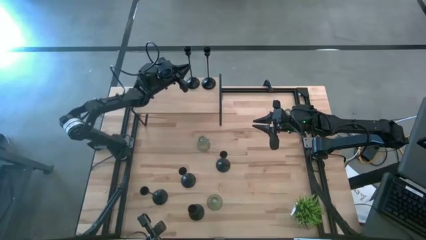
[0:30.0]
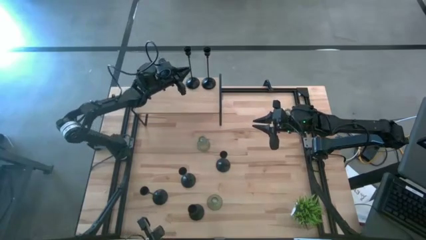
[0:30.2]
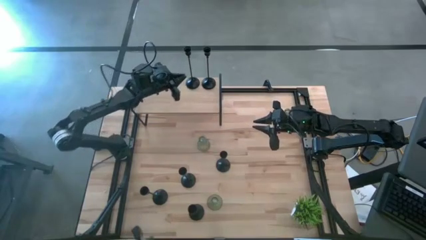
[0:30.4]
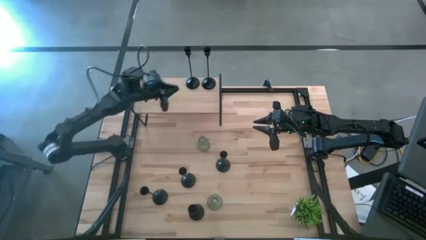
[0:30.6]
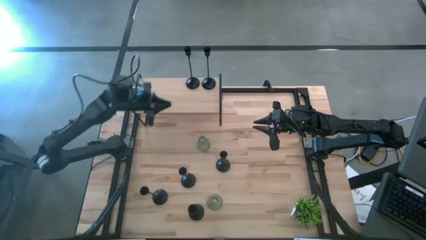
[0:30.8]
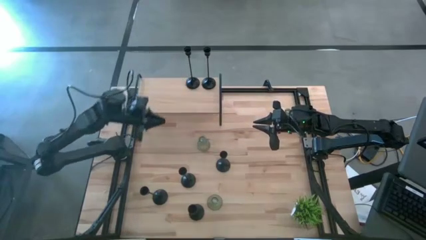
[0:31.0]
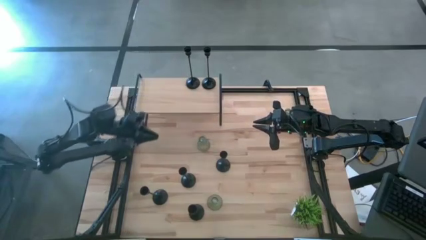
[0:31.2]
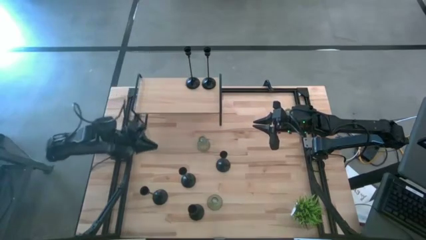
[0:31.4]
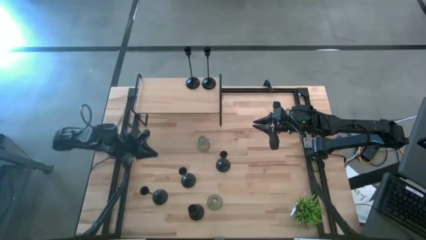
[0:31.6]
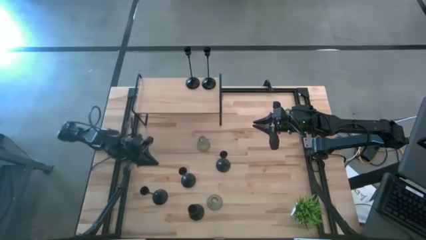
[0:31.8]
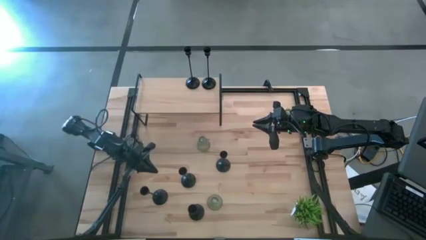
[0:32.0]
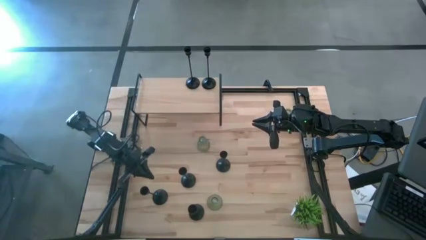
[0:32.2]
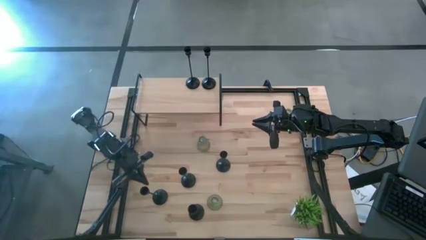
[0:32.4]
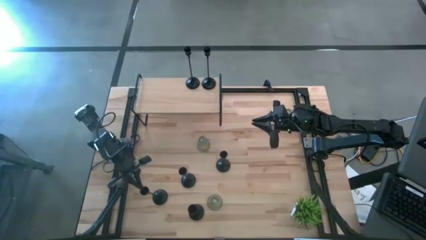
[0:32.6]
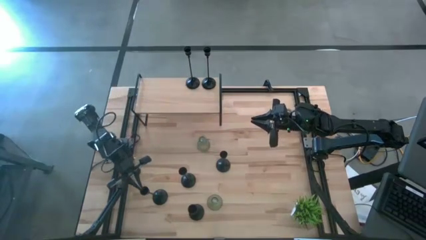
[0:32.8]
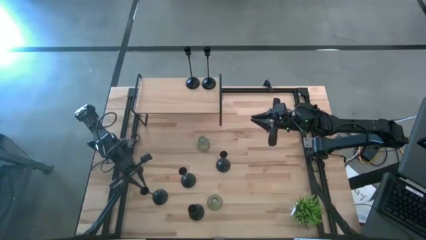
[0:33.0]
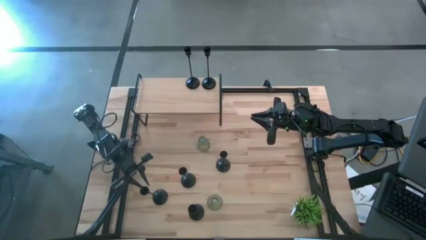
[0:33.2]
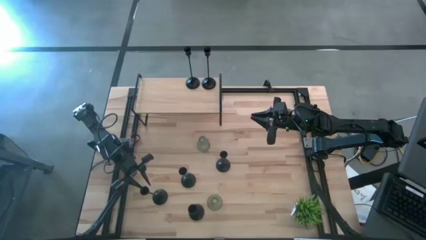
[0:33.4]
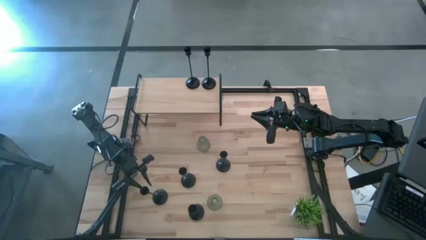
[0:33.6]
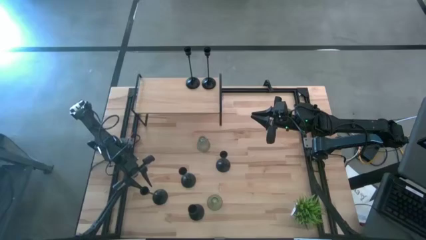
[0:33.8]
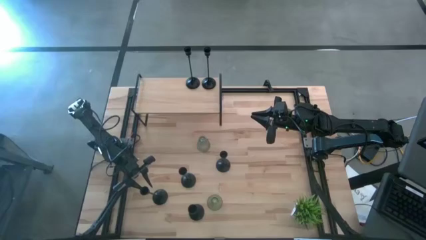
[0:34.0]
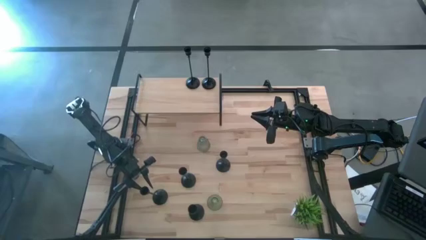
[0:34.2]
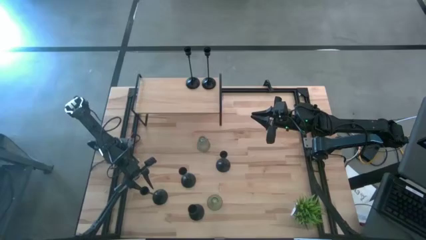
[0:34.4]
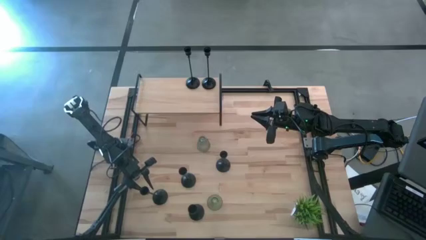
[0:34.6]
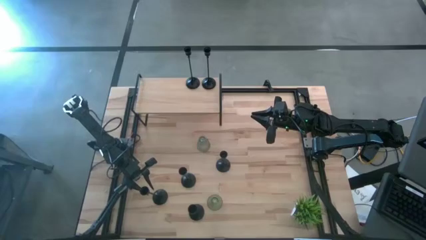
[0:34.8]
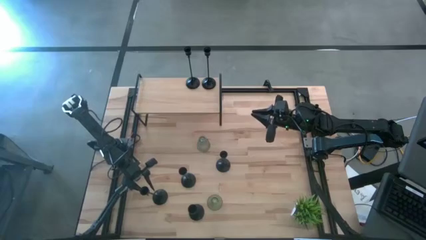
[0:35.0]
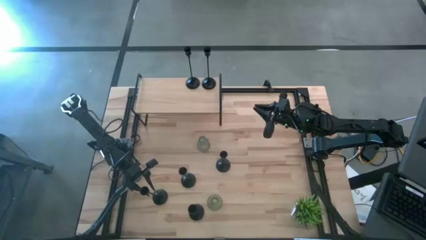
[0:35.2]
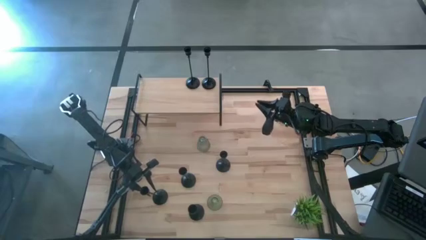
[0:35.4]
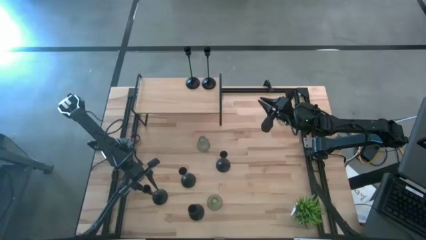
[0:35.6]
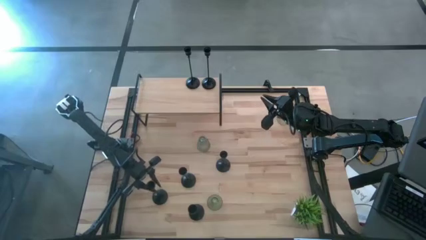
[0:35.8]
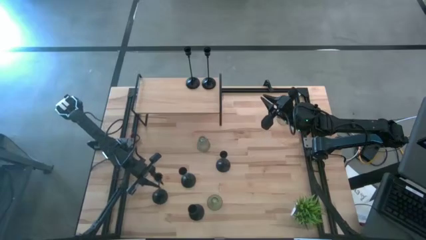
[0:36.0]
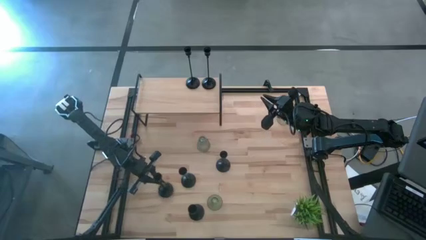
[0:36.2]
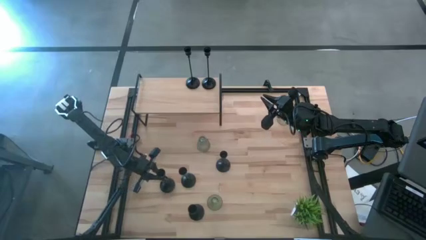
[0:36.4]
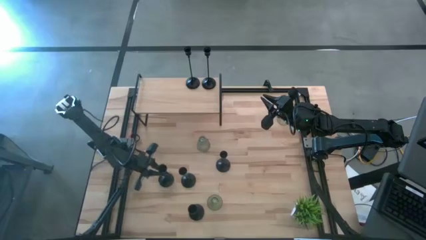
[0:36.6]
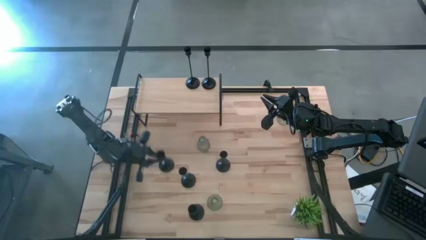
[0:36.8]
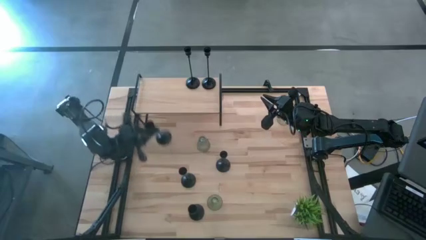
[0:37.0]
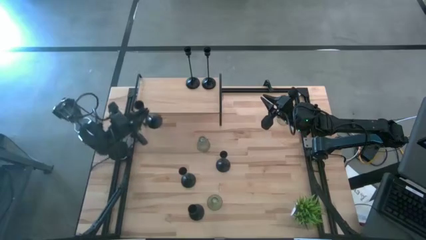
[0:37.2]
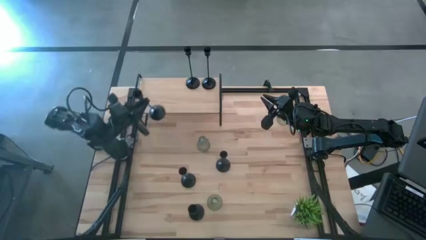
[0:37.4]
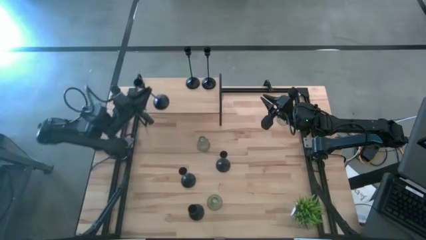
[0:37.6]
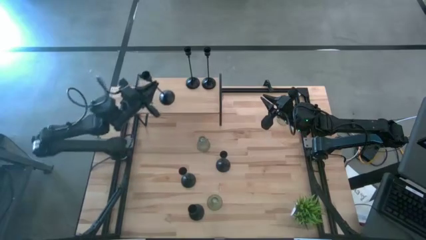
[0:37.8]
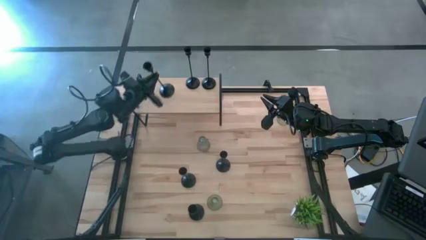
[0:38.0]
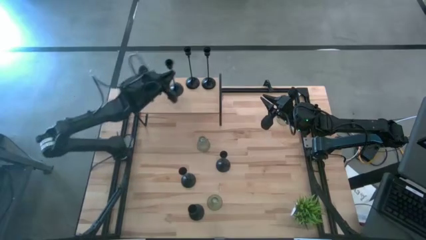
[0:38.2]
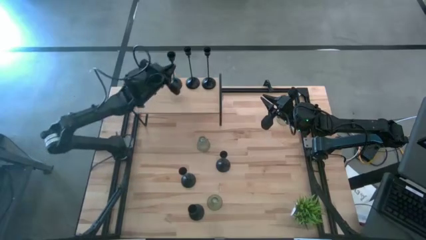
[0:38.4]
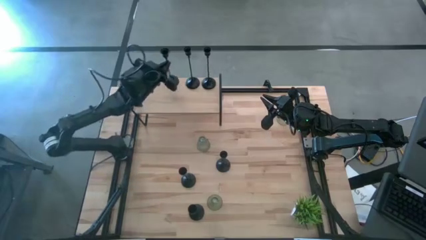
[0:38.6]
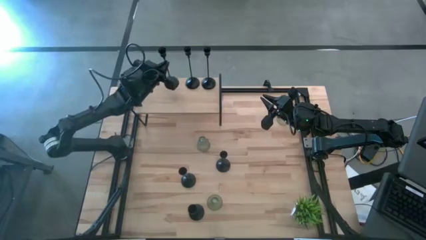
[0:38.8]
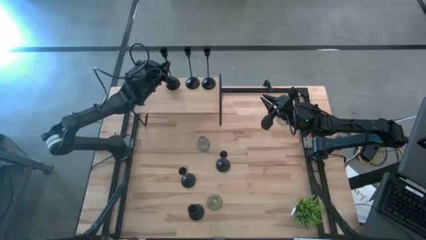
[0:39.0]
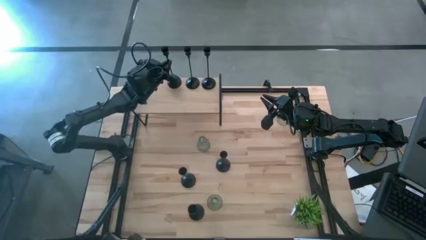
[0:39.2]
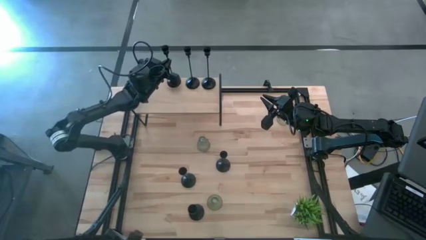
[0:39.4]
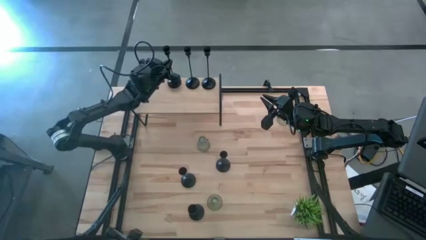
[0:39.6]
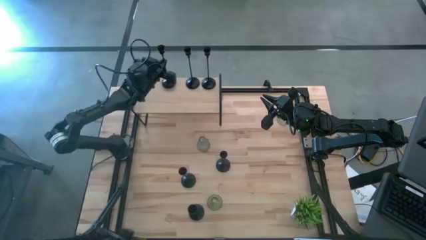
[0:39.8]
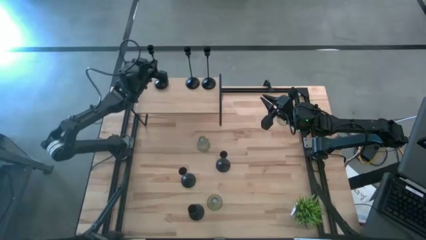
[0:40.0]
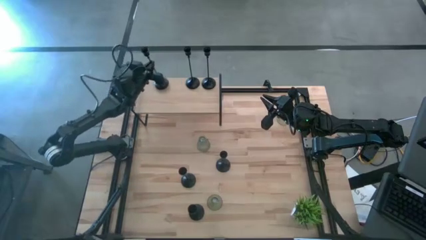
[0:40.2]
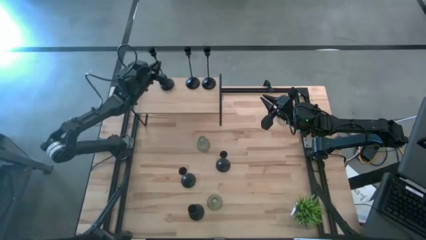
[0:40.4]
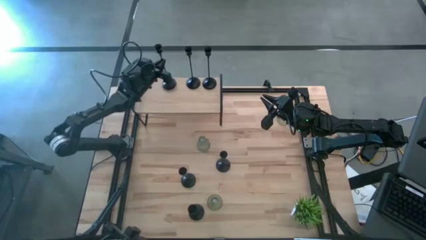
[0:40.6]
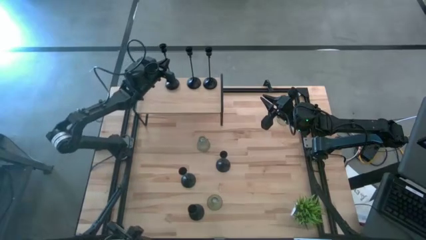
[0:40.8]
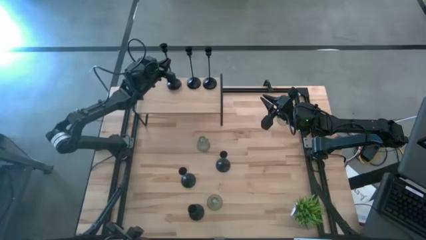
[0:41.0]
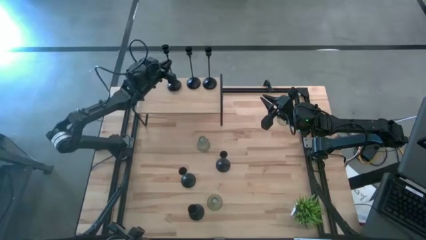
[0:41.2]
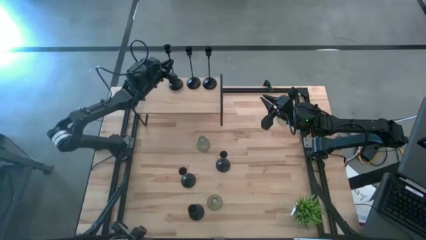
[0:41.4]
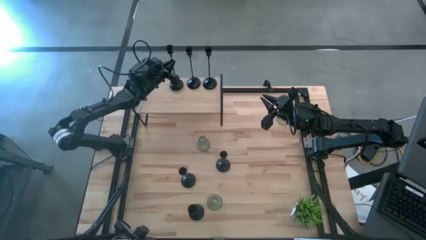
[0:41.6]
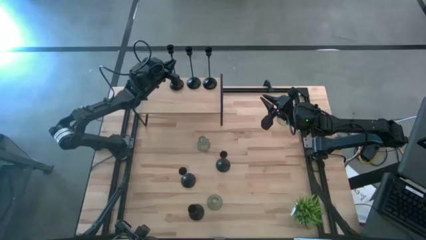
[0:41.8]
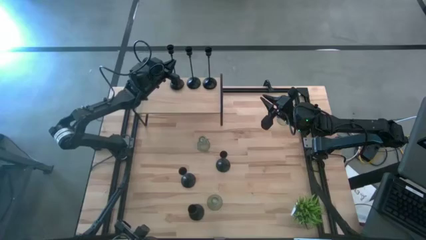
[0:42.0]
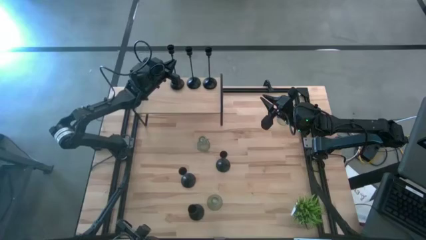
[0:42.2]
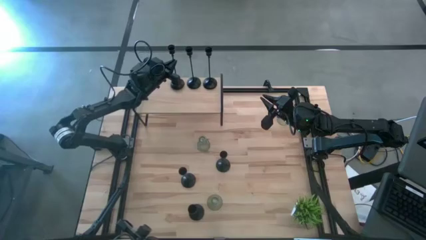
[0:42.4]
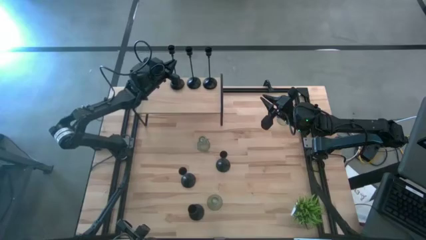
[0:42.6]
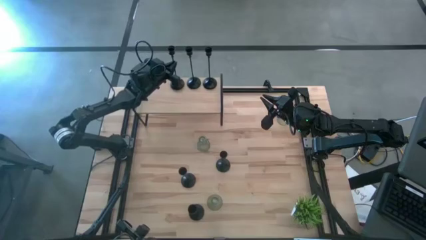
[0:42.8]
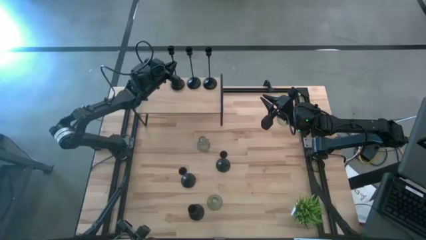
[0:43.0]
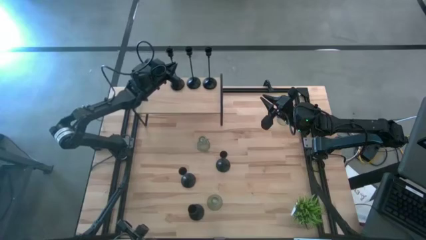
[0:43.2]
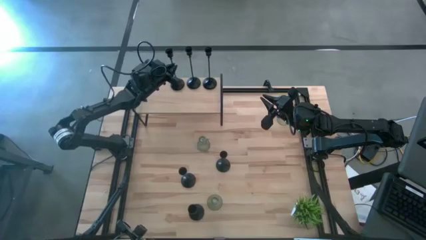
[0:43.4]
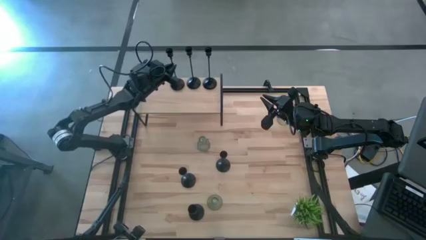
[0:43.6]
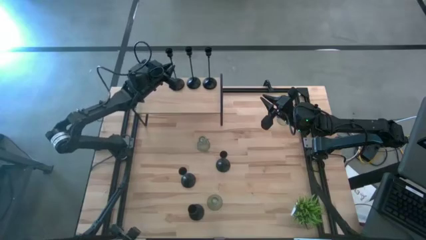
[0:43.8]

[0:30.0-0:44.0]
Task: Pick & Place candle stick holders
Put the black candleholder on the shelf
